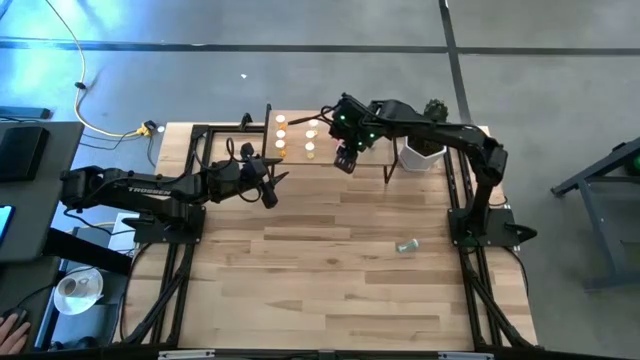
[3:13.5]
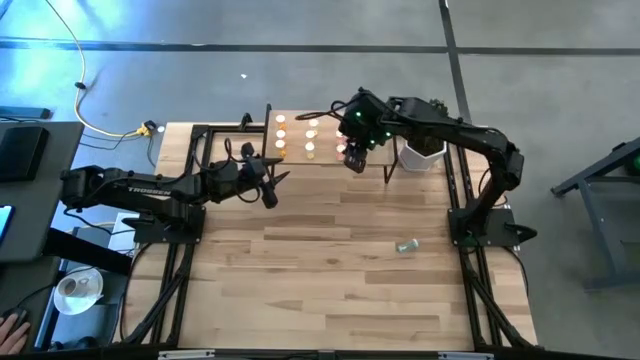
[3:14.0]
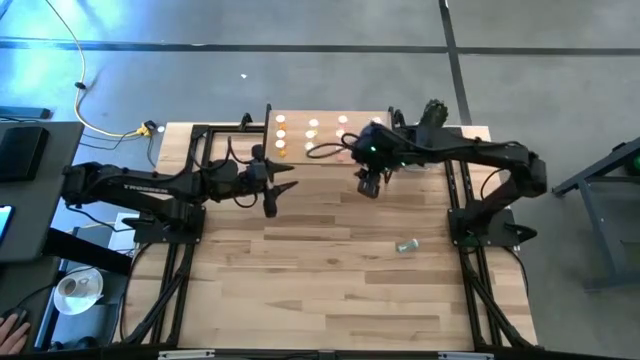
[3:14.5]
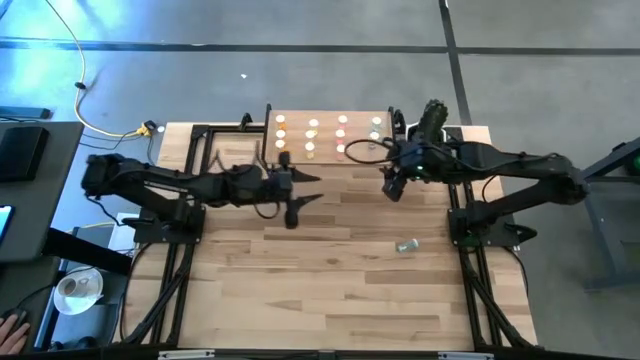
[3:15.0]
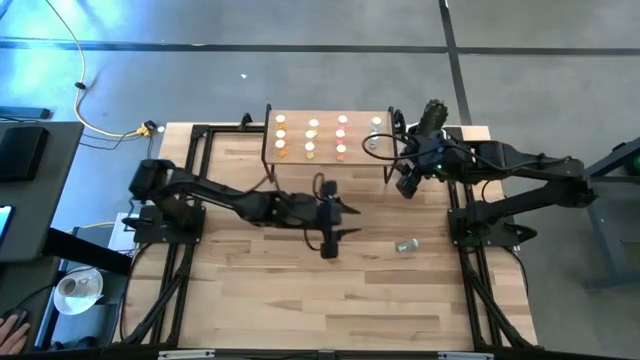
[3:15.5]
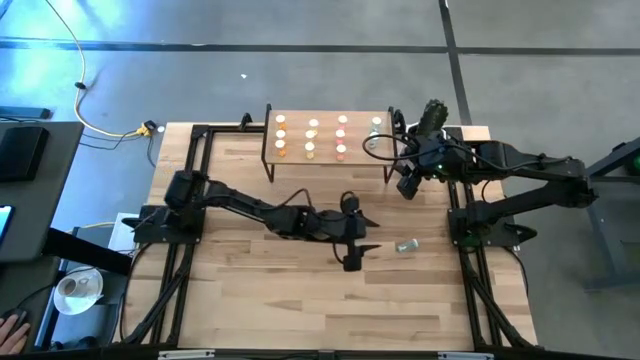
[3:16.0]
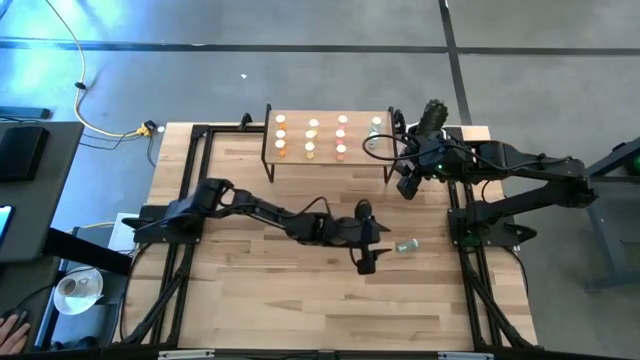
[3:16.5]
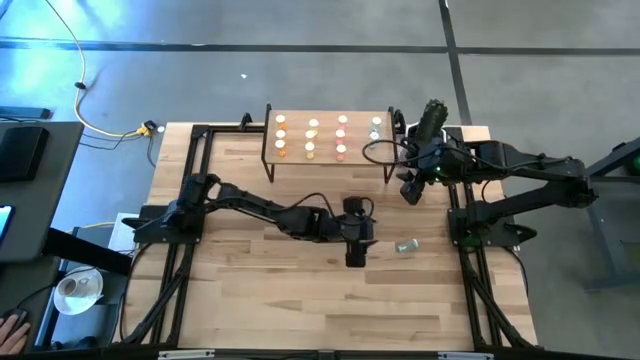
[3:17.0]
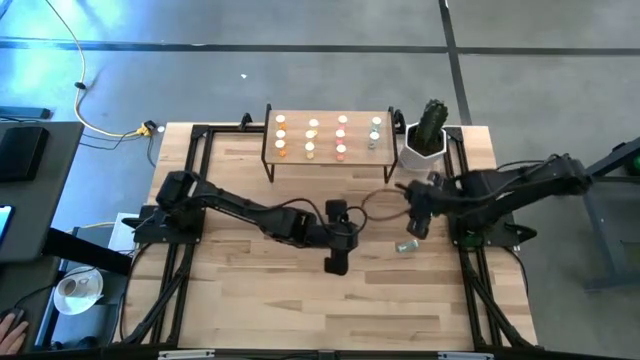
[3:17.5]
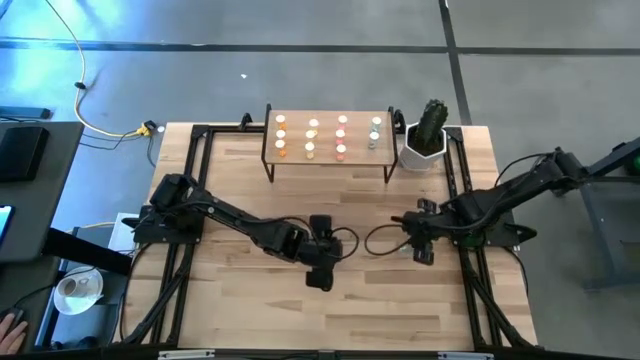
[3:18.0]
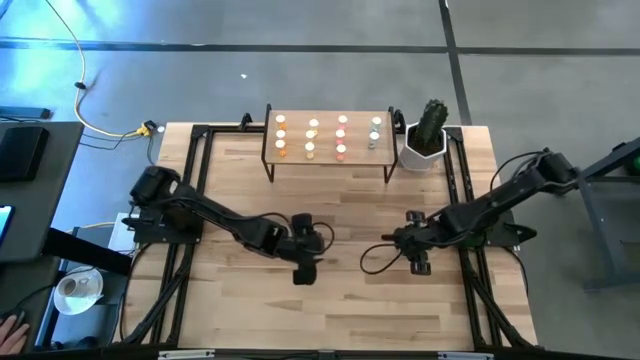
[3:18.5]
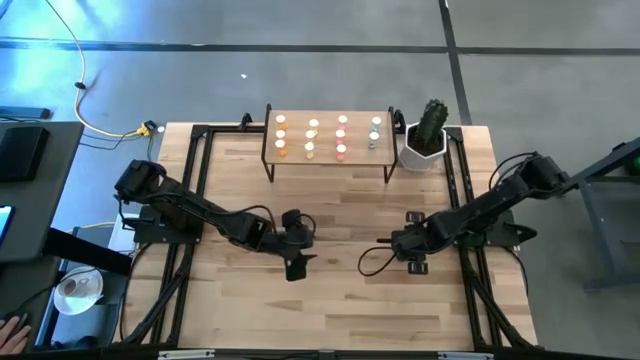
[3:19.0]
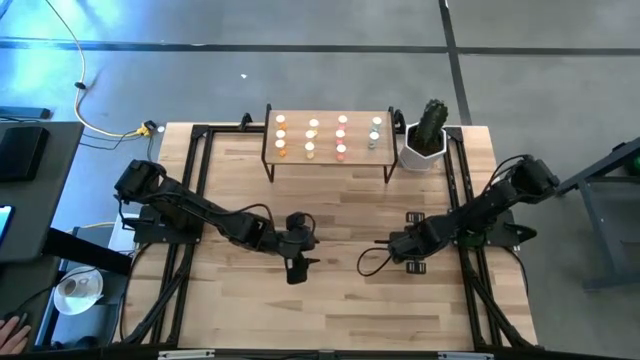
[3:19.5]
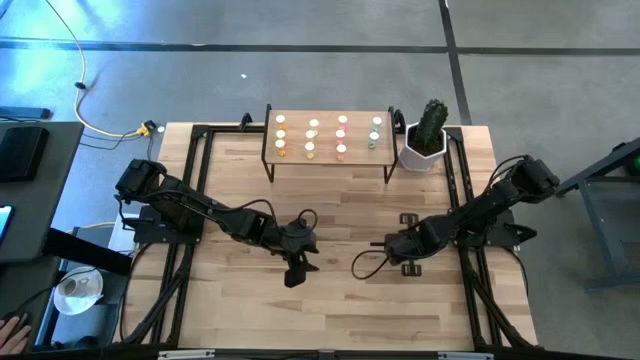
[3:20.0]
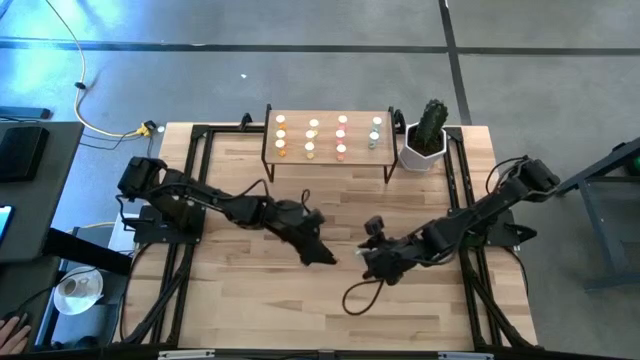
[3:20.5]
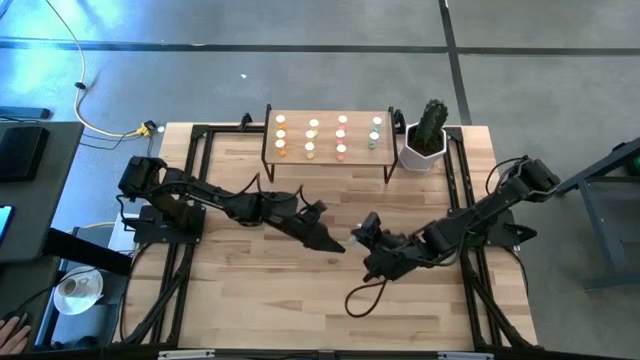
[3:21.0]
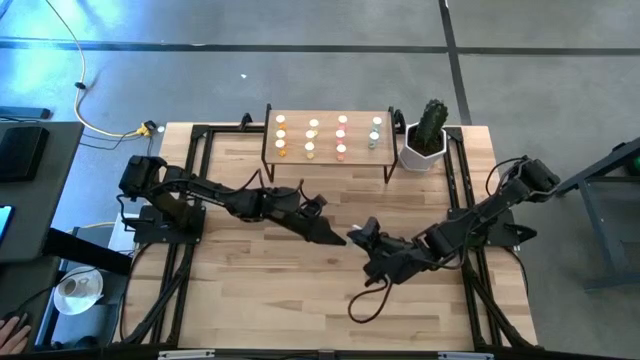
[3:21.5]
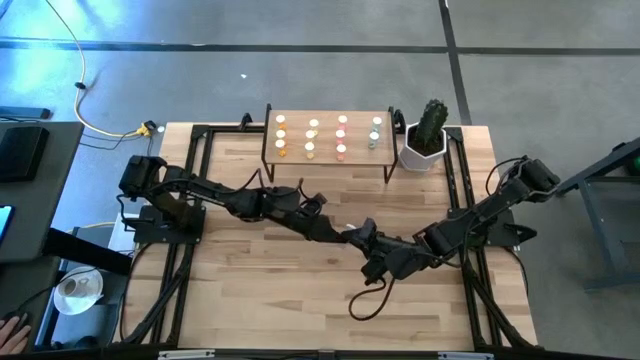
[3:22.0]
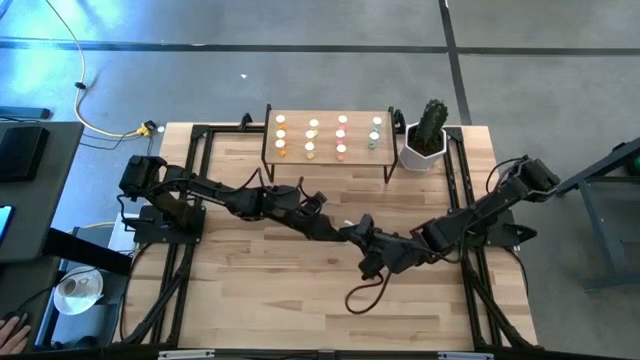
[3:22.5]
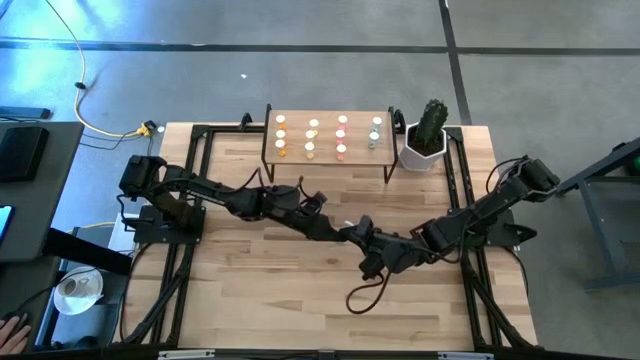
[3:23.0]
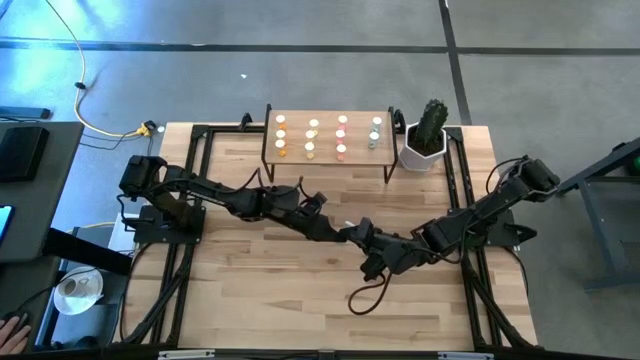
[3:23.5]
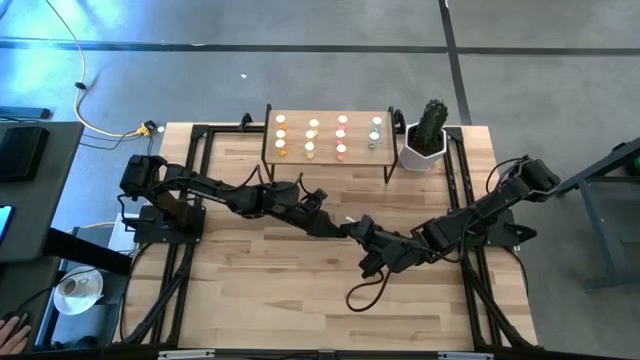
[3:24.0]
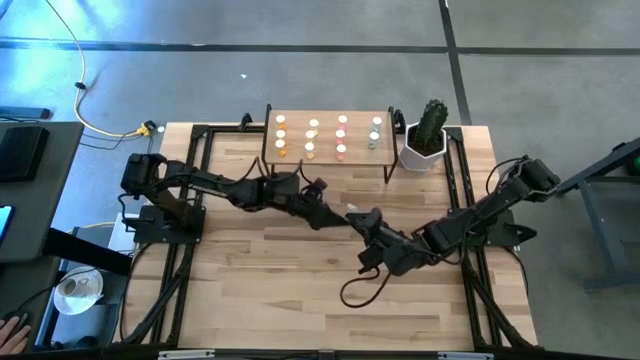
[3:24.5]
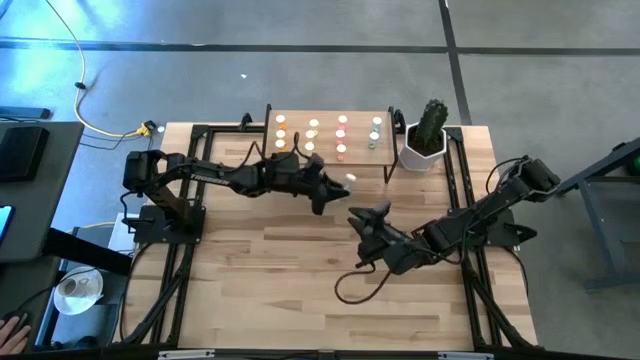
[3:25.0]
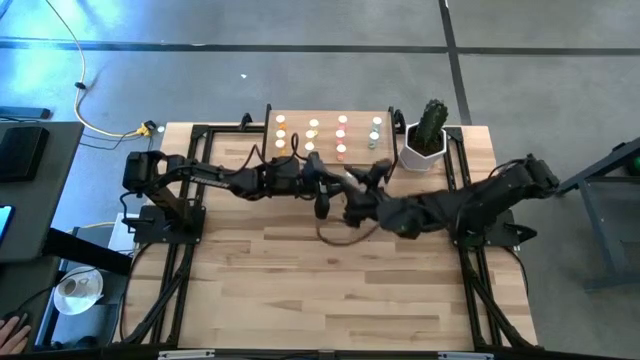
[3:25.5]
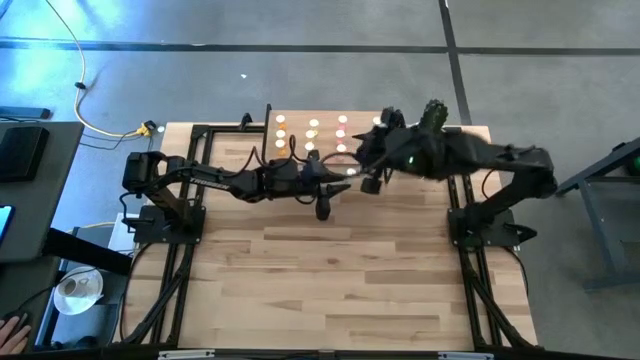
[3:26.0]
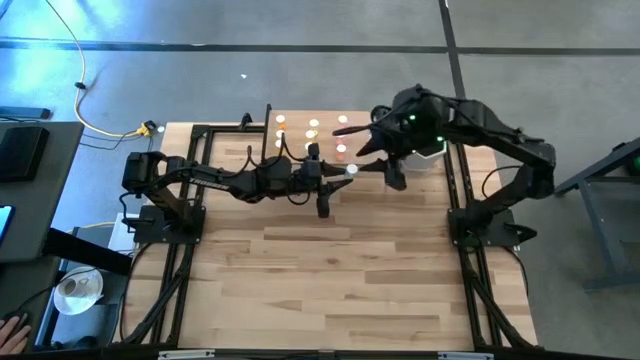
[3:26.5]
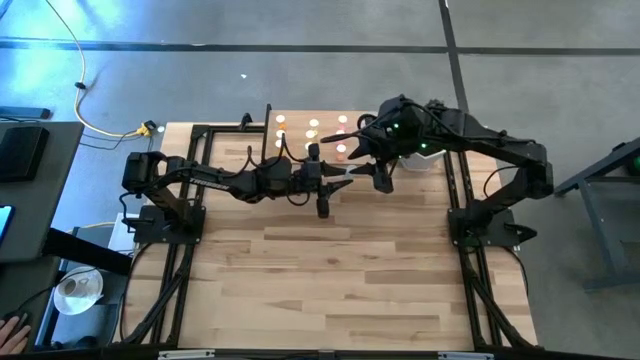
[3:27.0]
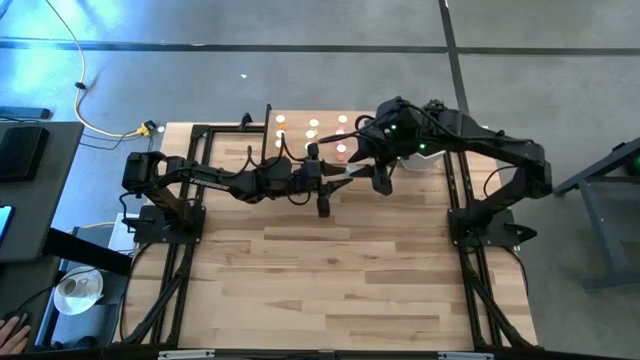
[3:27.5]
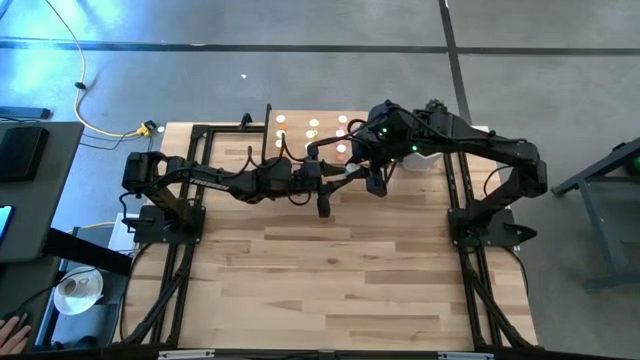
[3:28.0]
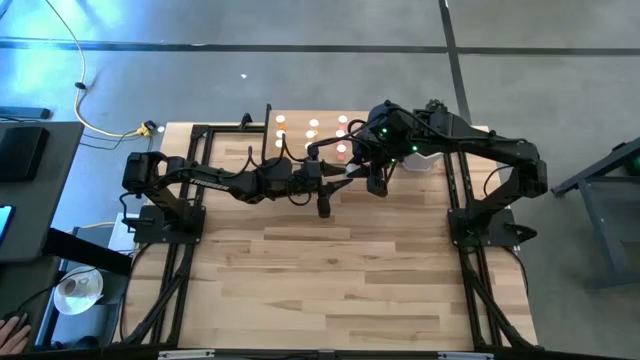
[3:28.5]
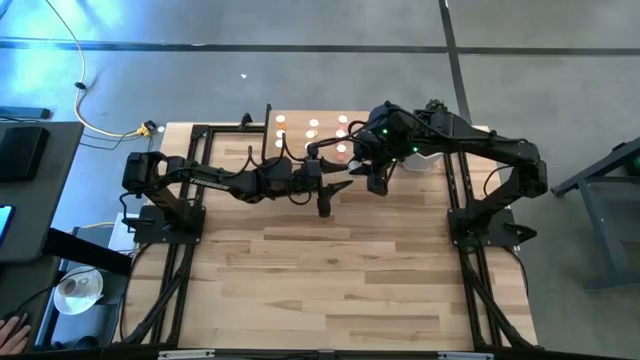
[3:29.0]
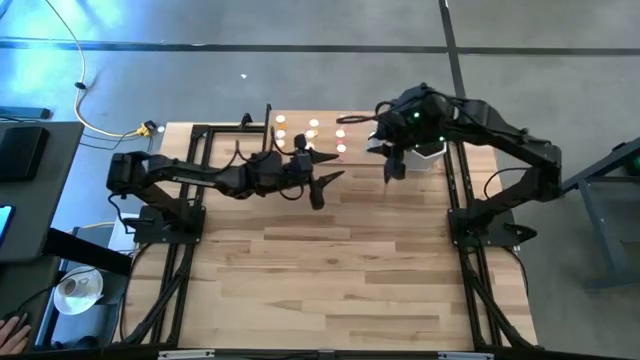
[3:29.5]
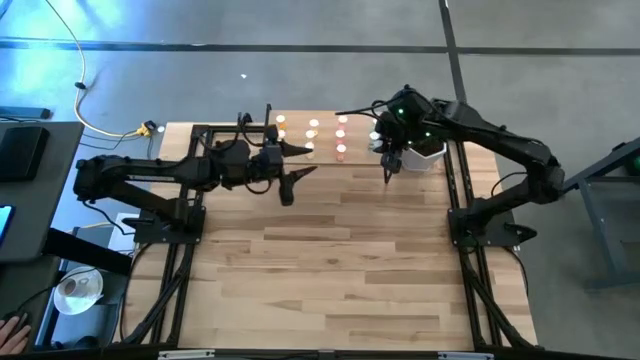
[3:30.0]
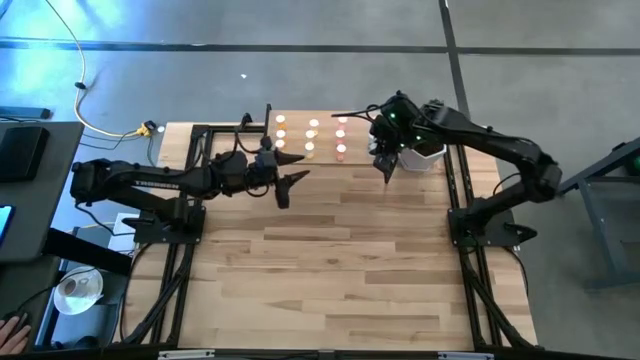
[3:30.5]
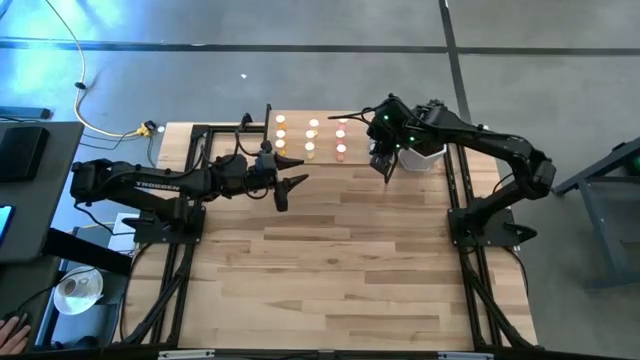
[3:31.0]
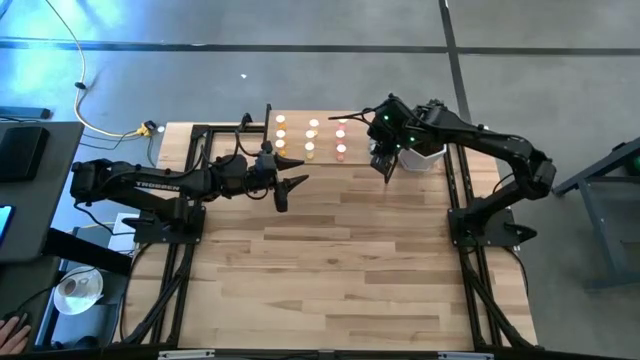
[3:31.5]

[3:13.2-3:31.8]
Task: Pick and place medicine bottles onto shelf by color
Put the blue pill bottle on the shelf aligned with the other blue pill bottles
